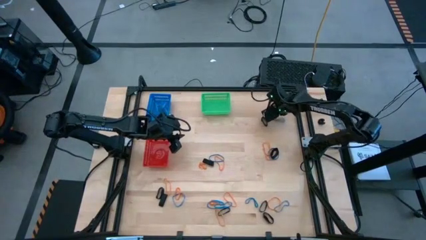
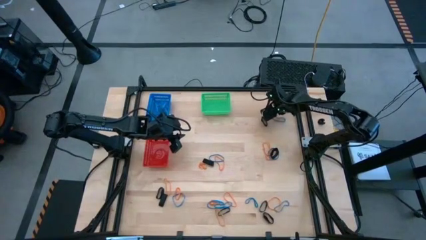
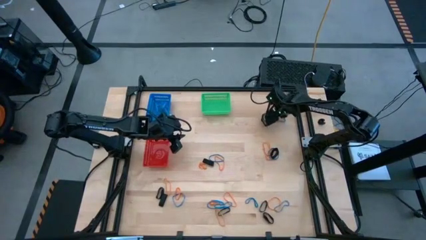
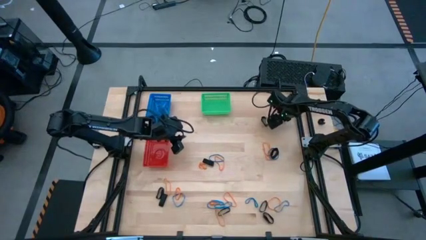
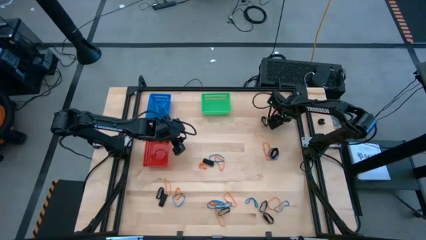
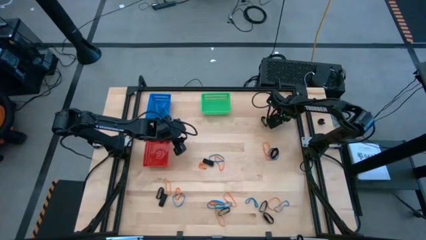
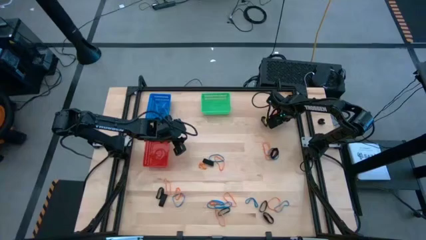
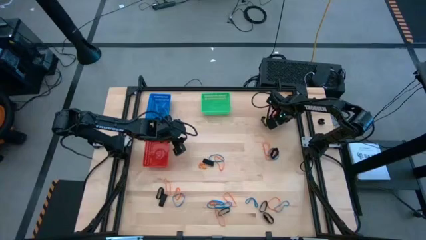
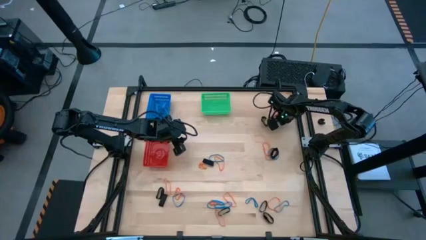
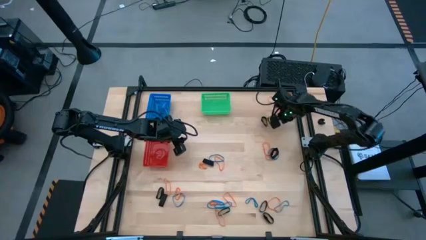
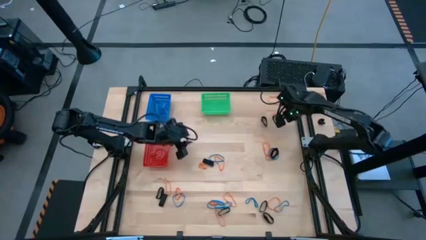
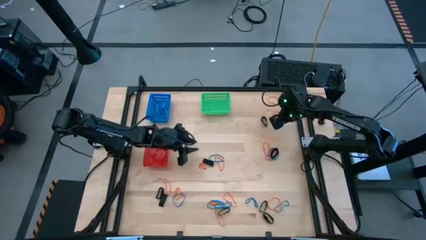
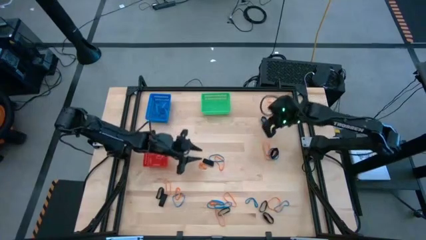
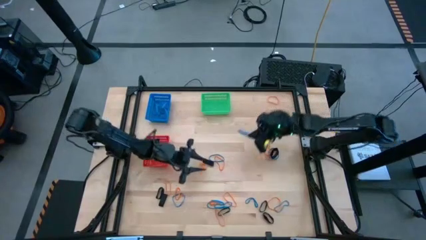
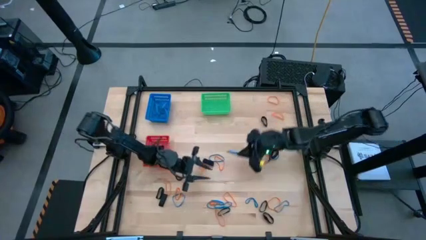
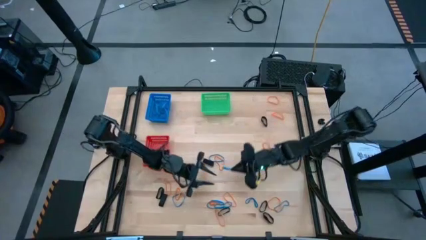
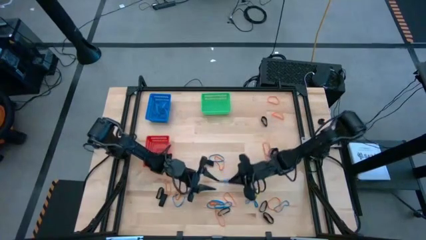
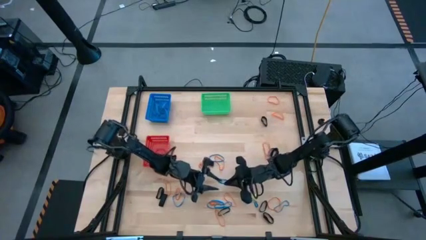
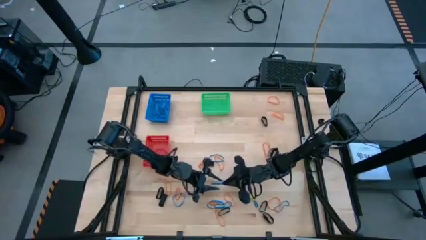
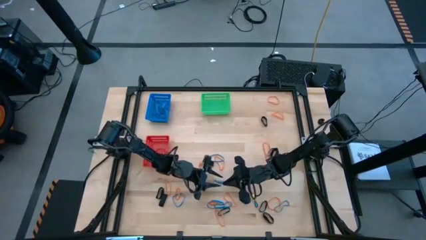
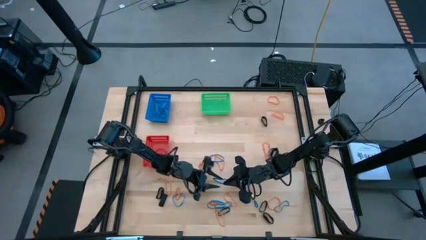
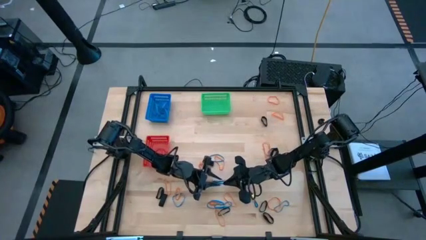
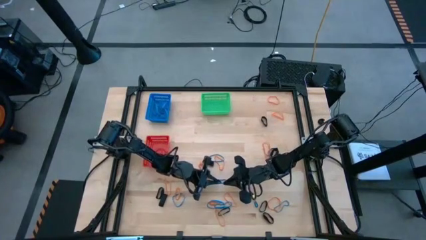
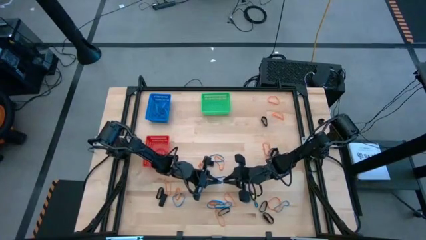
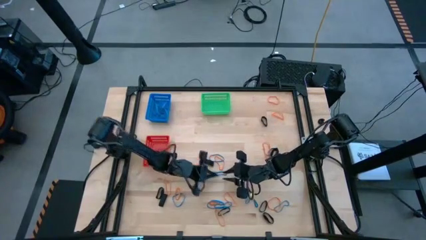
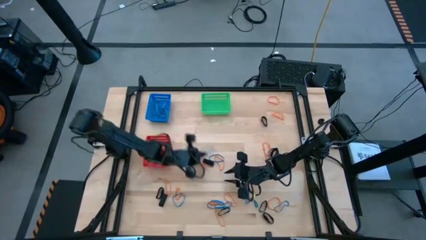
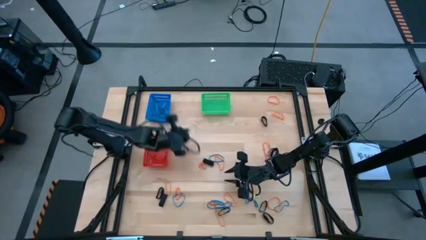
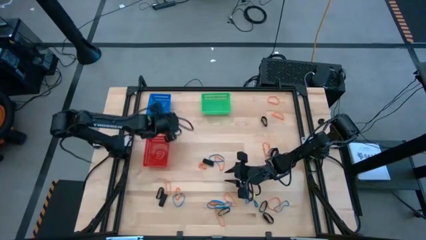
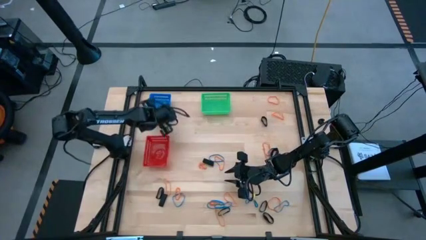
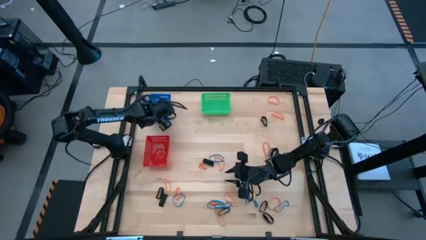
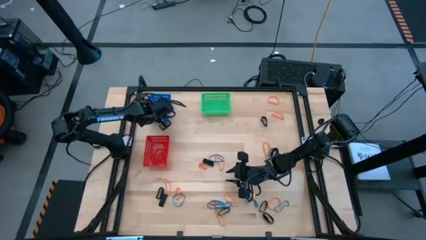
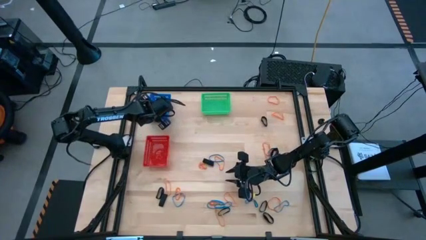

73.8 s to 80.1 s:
Task: Sort rubber bands into baskets
Put the blue rubber band into the blue bin

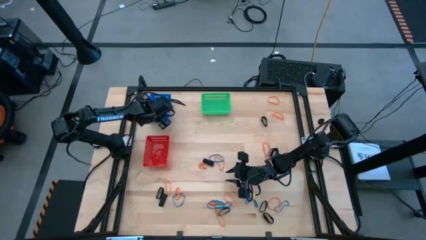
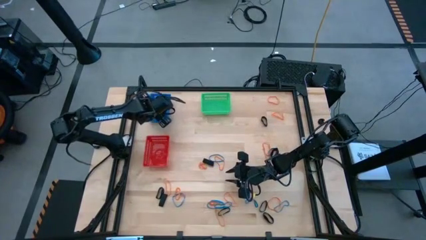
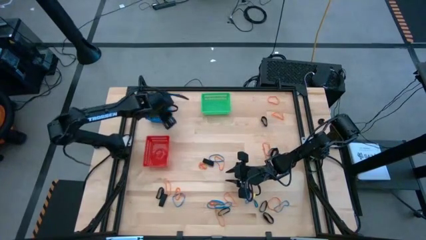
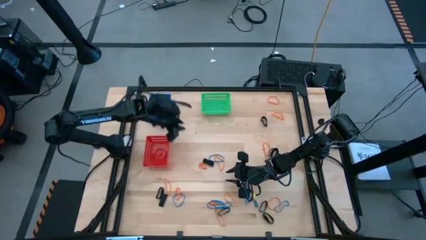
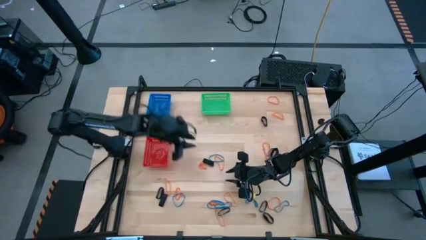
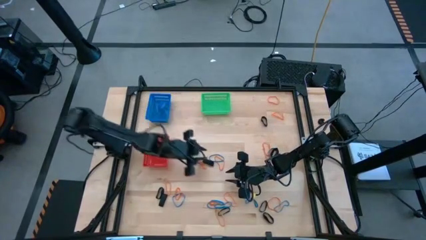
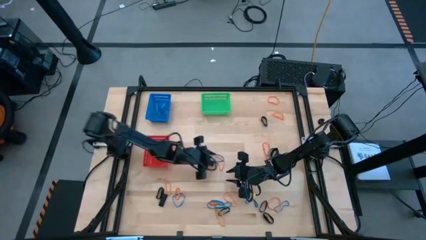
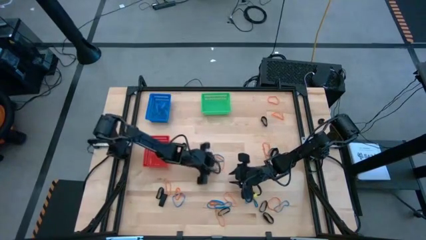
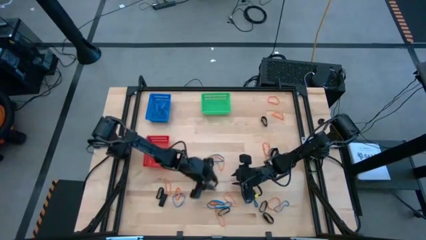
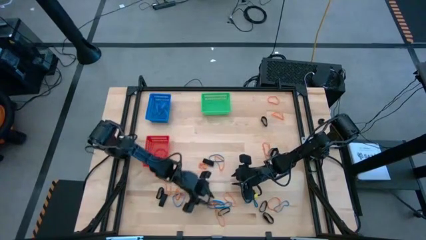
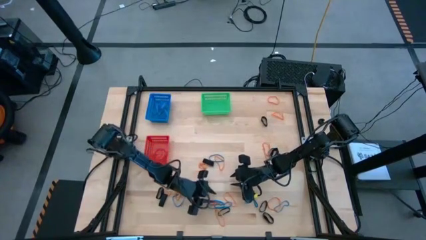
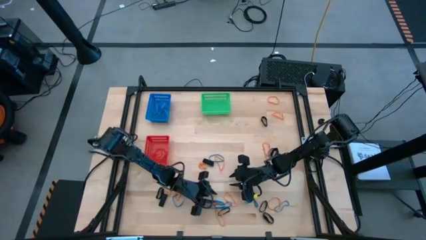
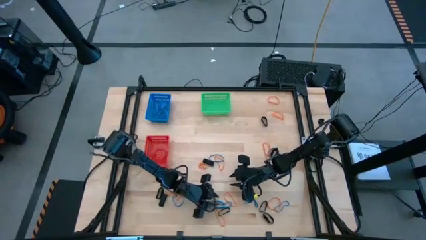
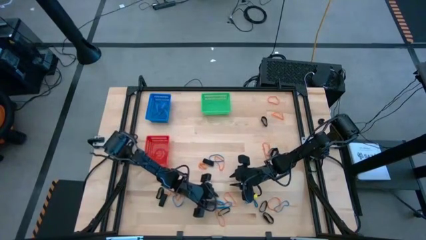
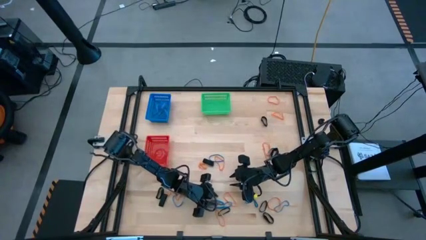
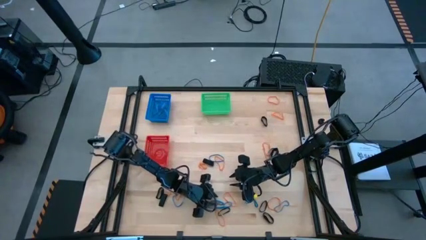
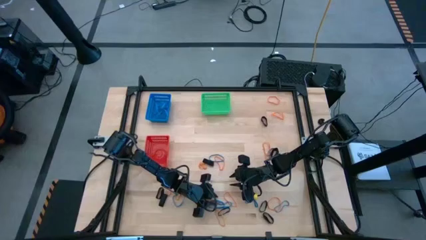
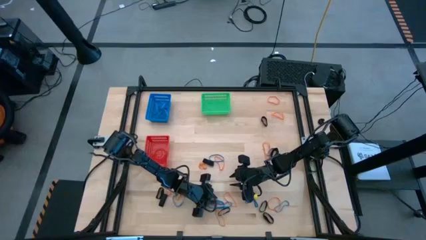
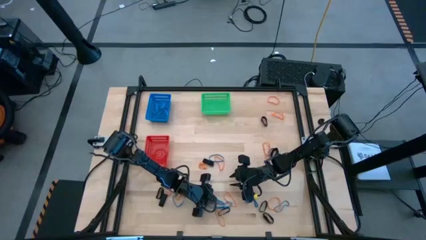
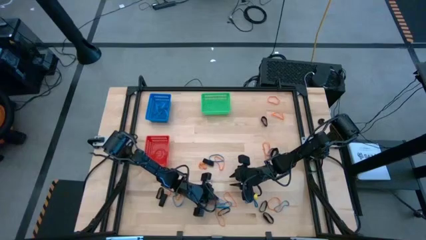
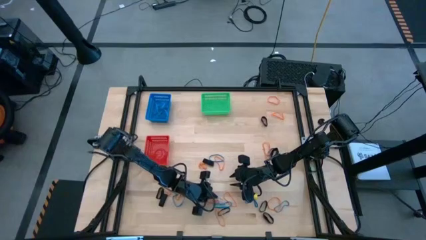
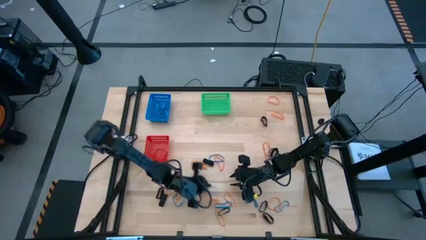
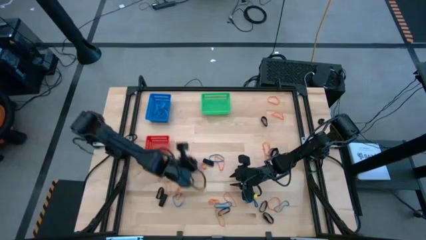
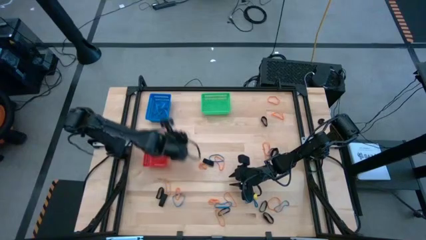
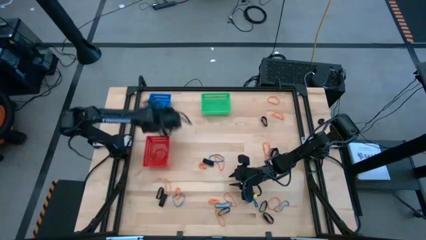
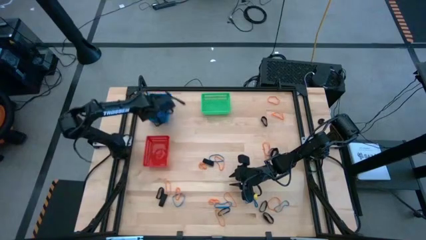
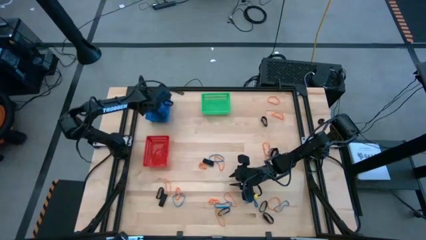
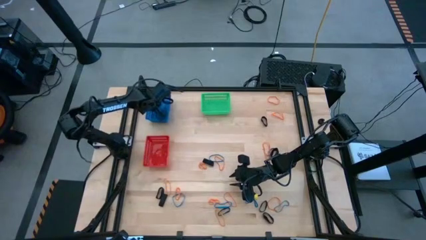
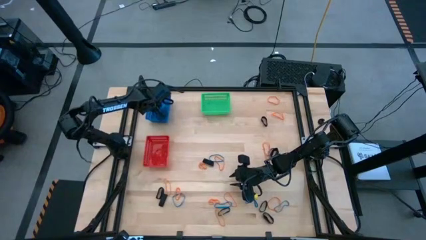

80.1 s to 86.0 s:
Put the blue rubber band into the blue bin

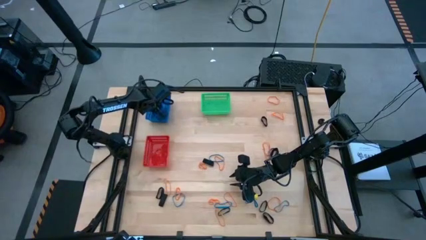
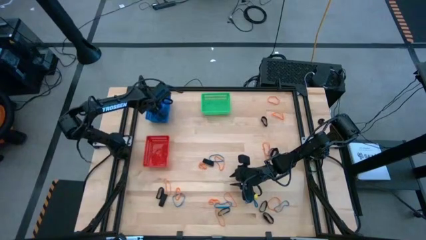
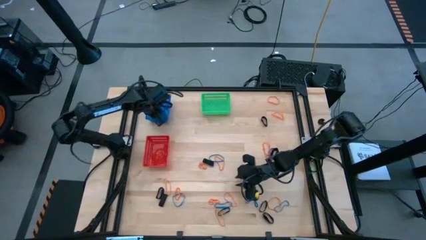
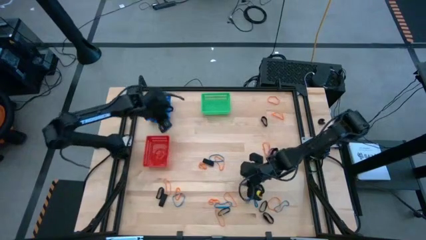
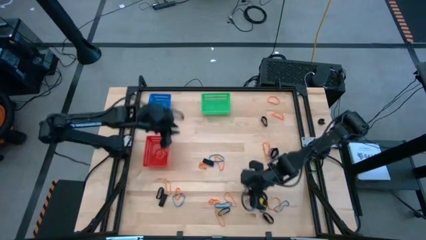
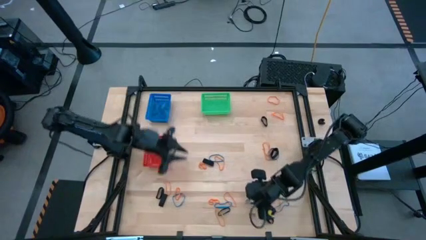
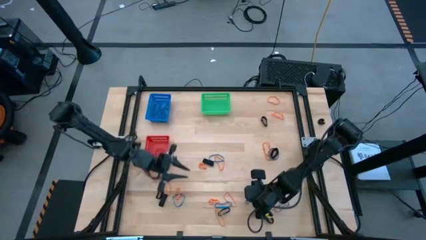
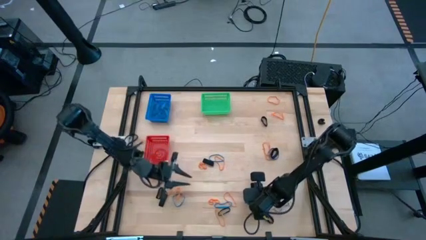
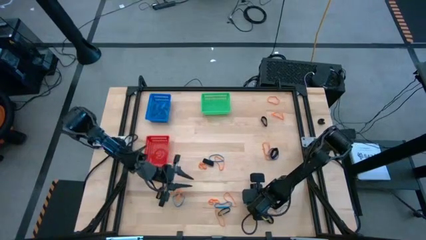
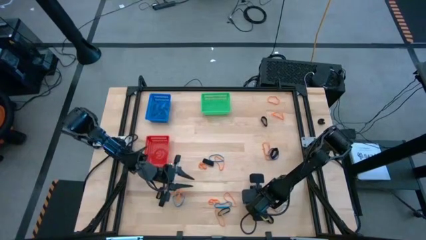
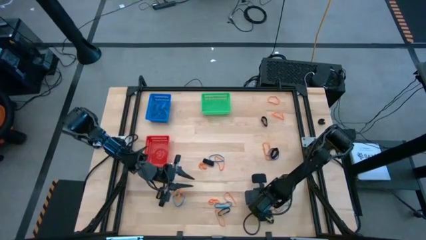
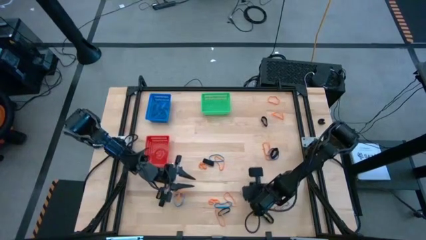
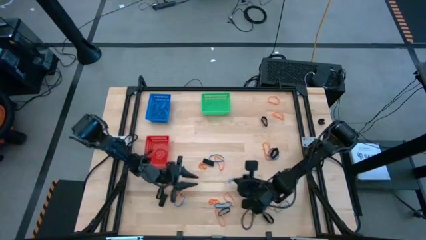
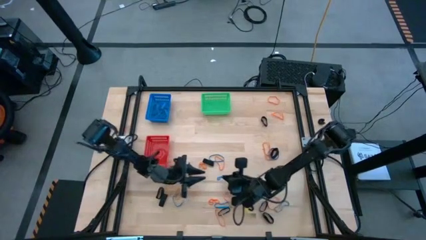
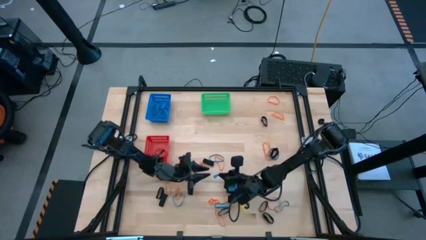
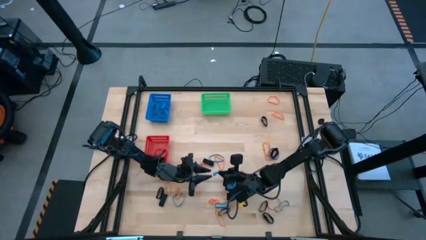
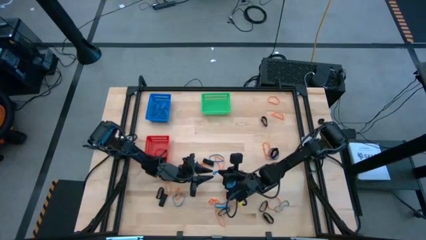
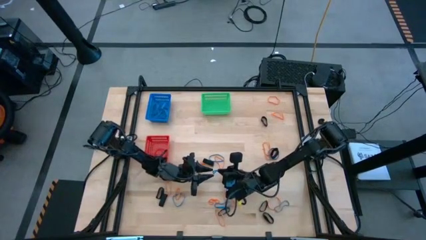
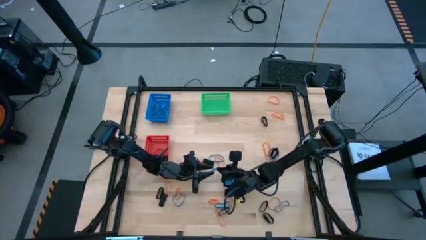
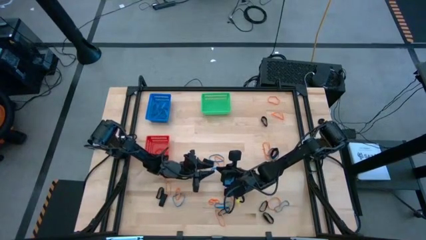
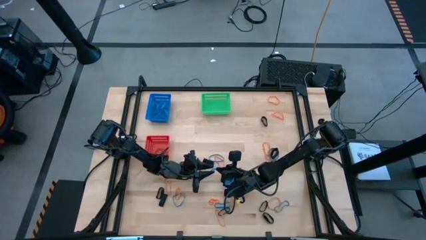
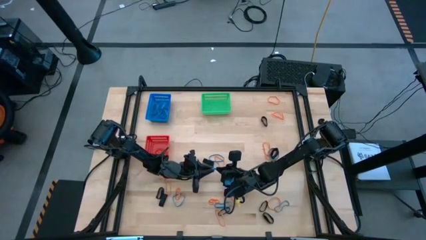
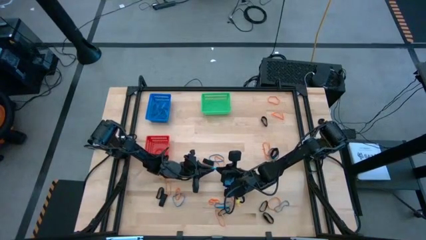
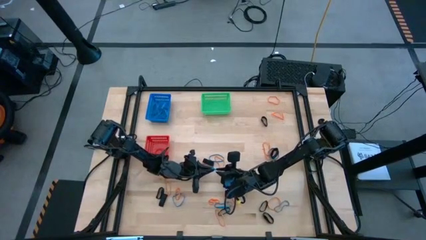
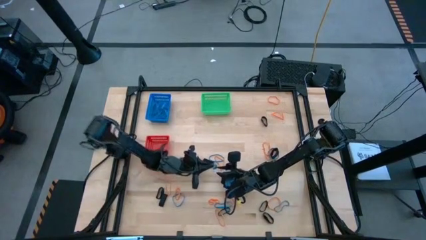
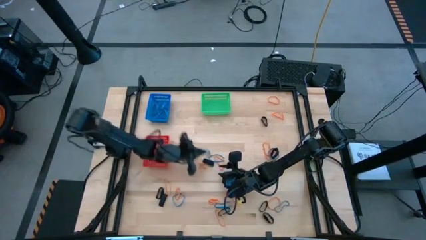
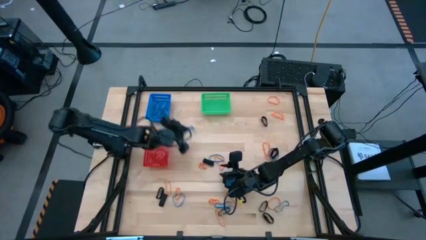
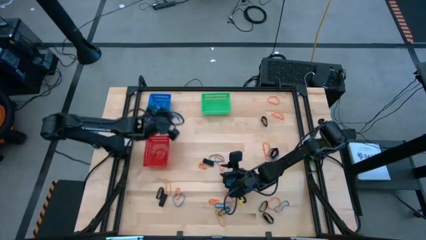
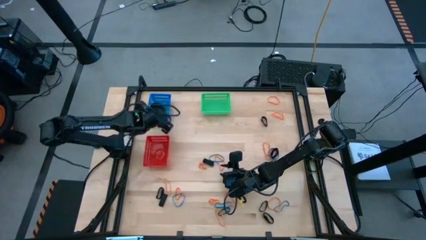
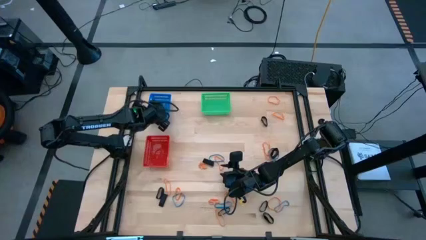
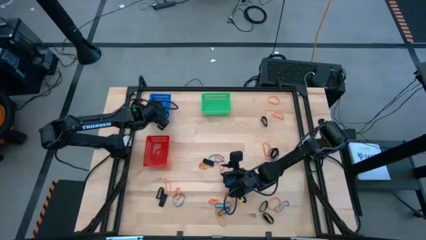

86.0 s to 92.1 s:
Put the blue rubber band into the blue bin
